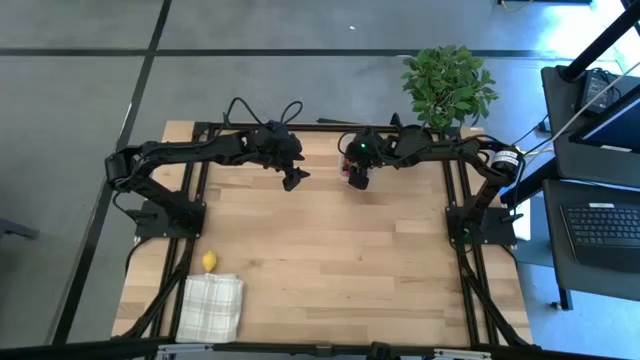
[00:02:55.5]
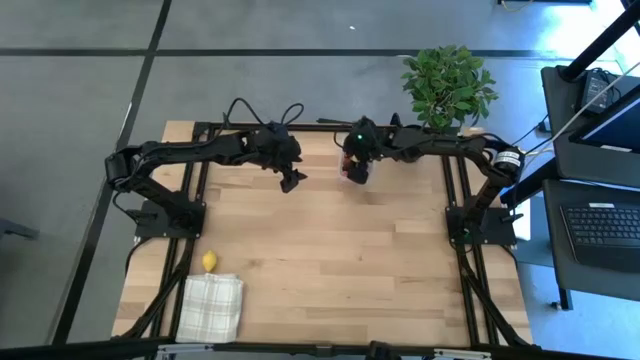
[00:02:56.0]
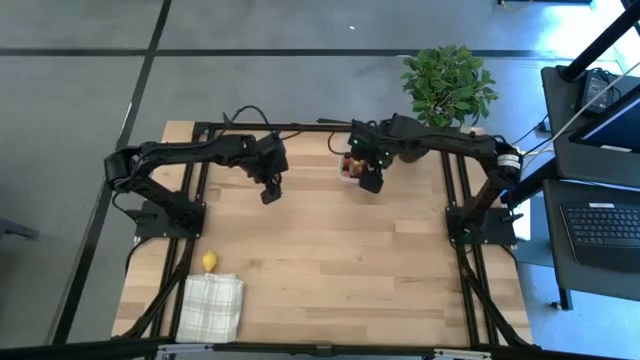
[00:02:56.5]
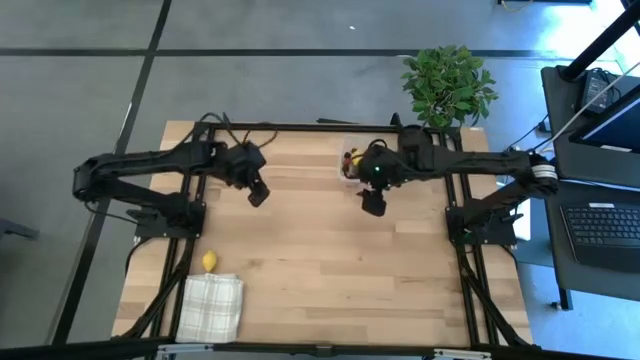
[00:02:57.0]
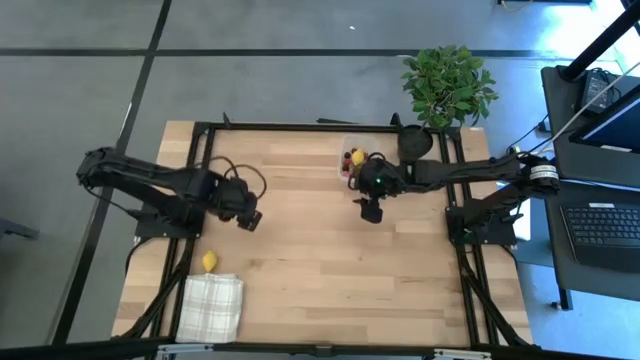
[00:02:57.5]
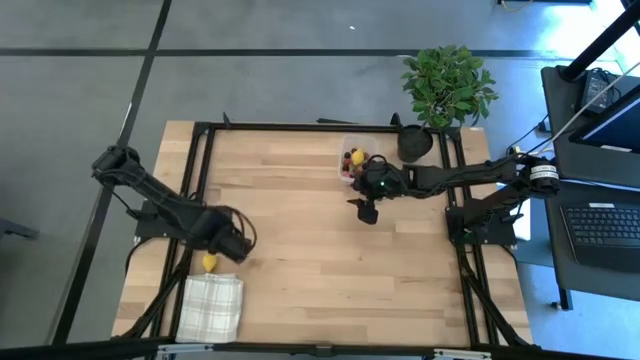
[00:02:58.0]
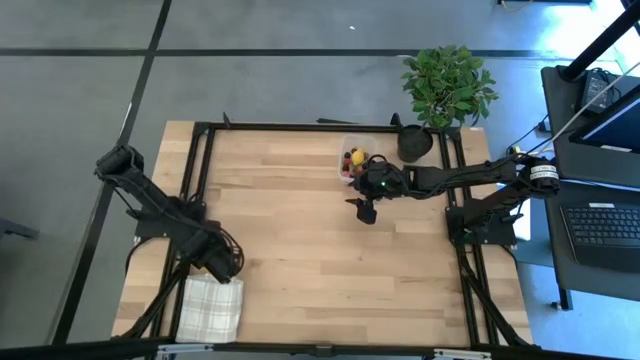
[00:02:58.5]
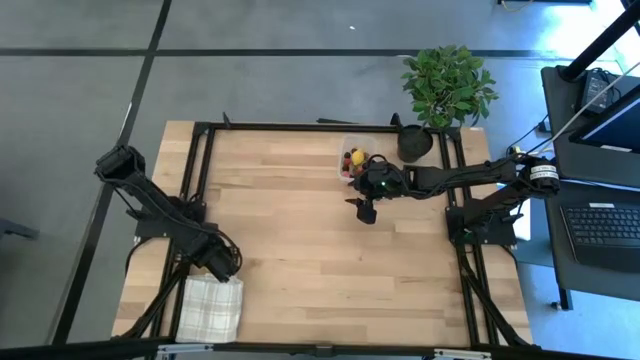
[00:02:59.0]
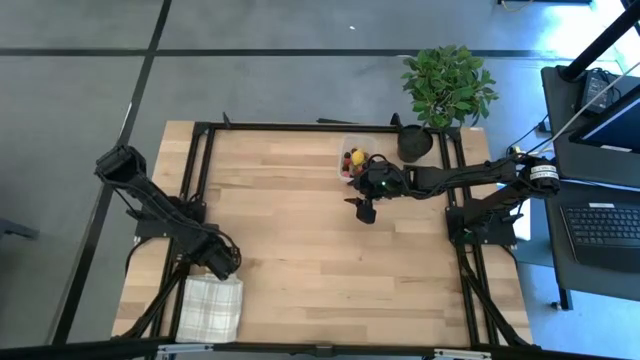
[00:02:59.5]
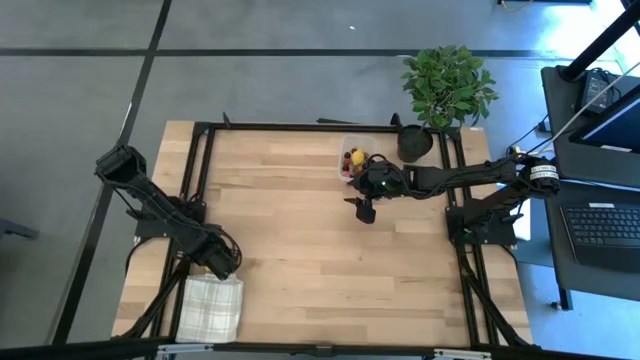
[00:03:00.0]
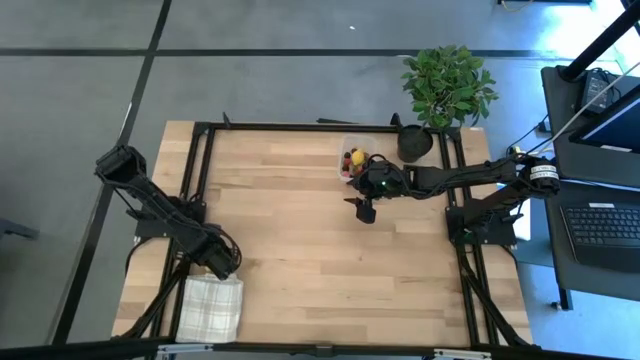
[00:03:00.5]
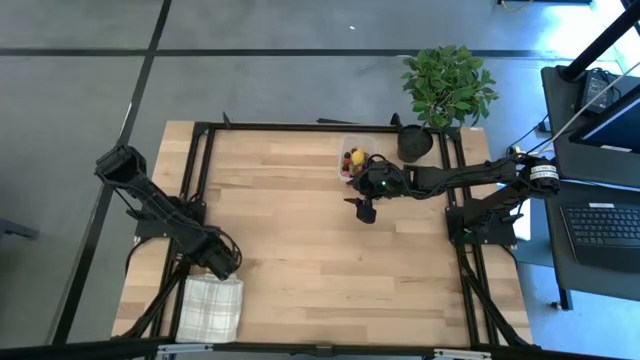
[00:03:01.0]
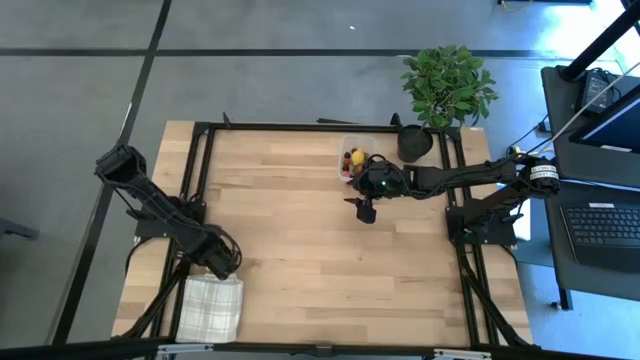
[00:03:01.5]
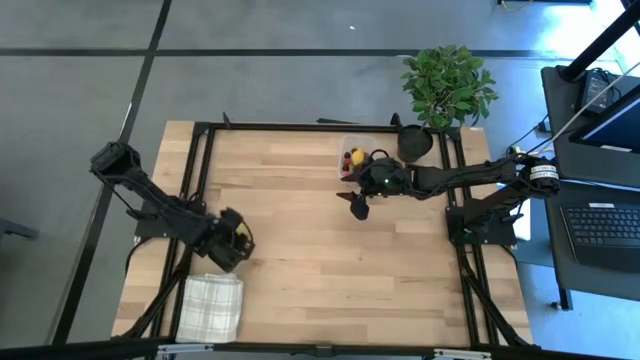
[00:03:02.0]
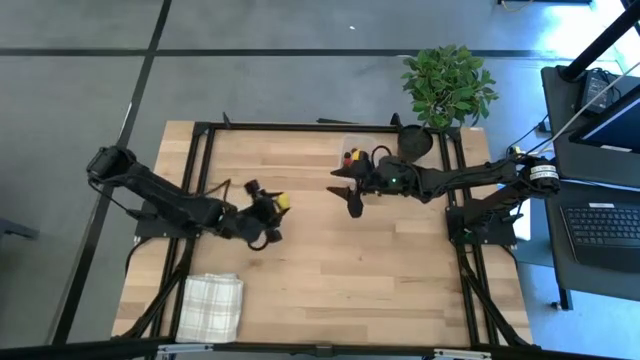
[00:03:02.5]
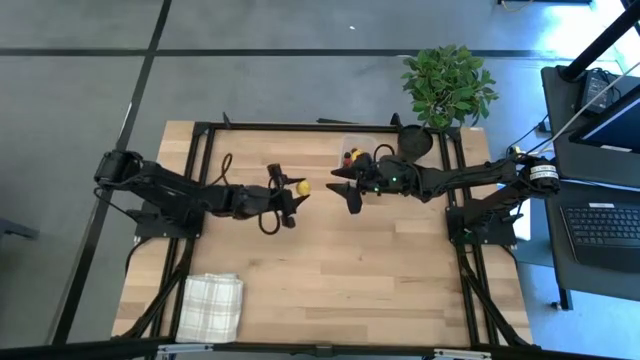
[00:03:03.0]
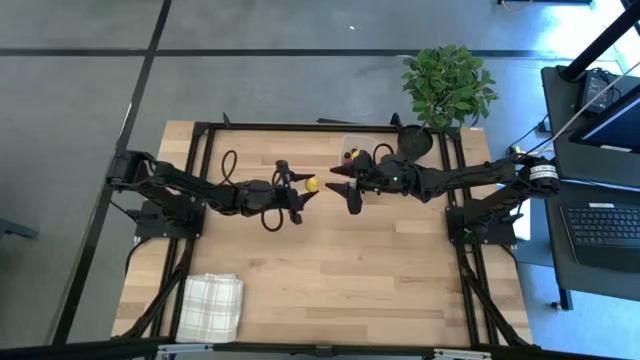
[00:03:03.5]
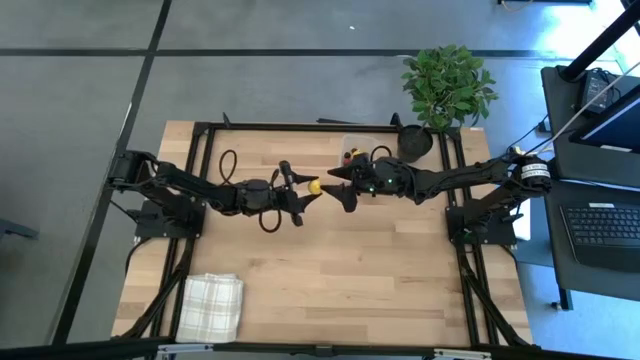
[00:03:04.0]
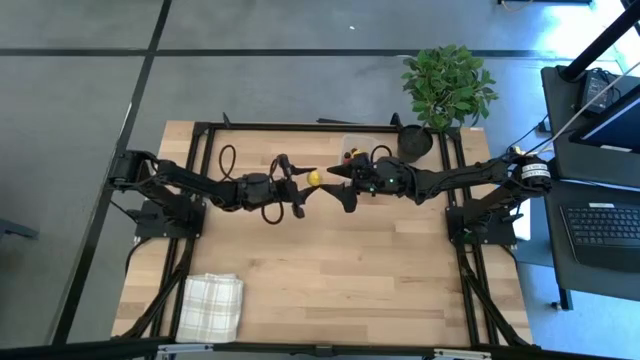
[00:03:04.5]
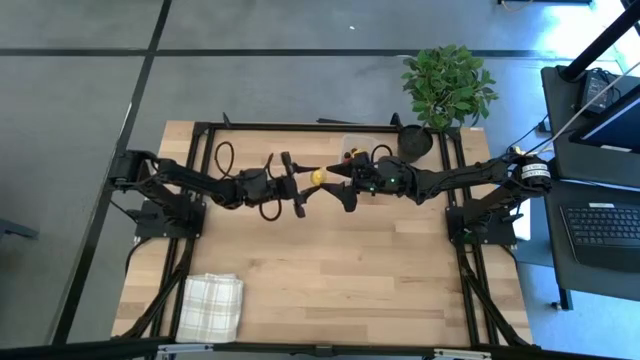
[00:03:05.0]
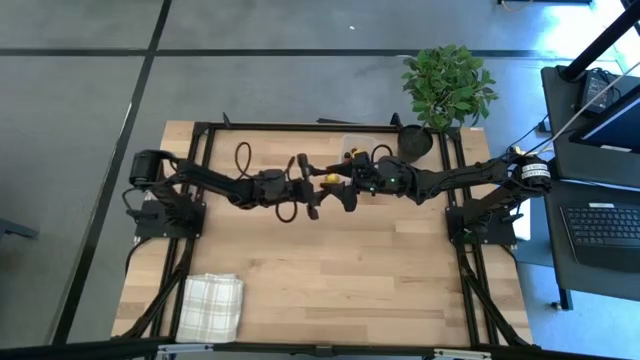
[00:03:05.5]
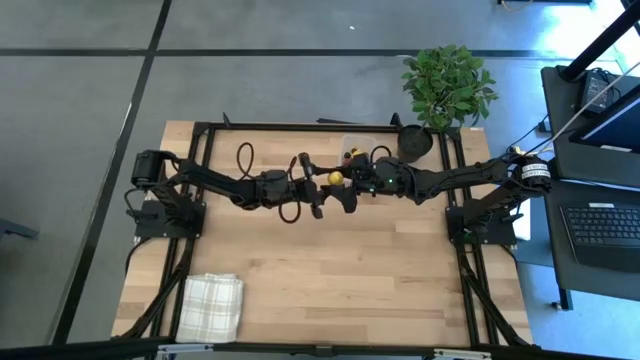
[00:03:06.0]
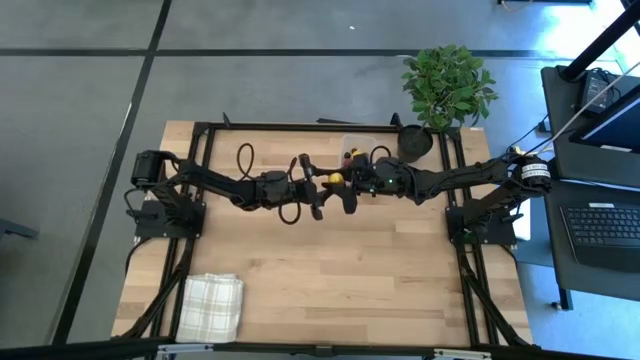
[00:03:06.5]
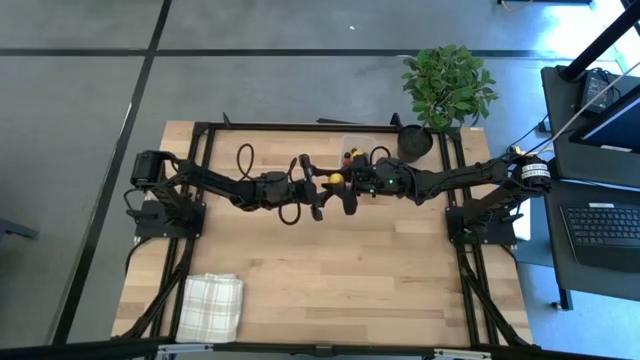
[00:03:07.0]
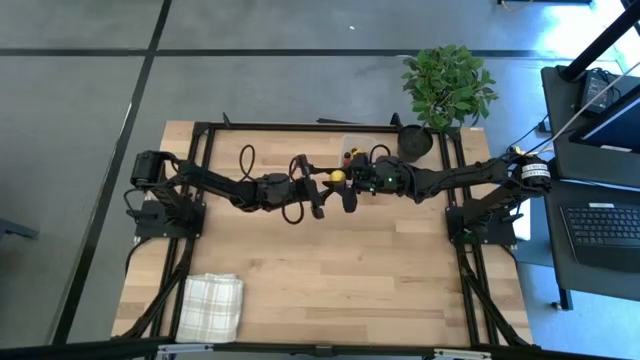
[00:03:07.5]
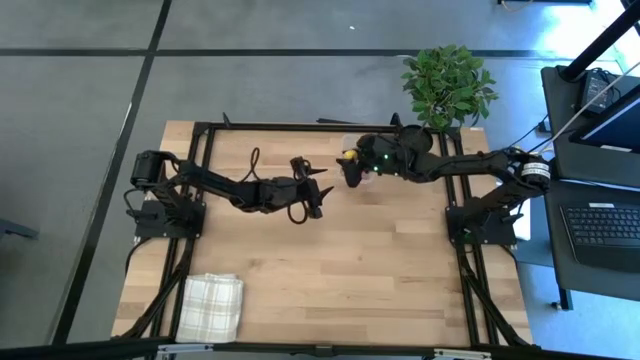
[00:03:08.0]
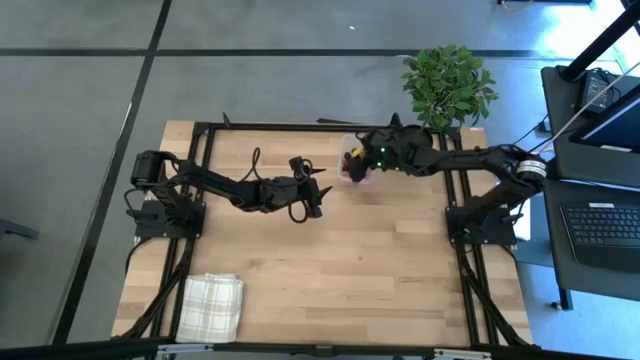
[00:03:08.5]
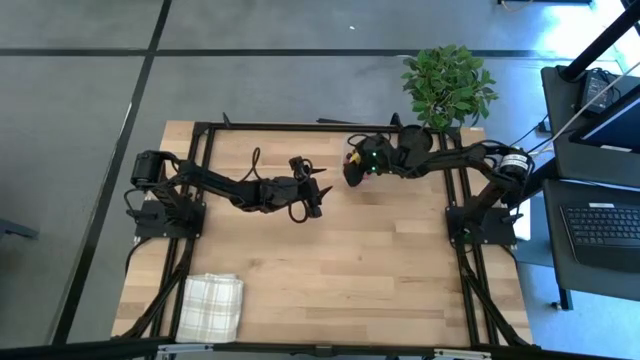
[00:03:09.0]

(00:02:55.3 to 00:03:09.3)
Task: Pick and placing Produce into tupperware
Put the lemon into the transparent bin

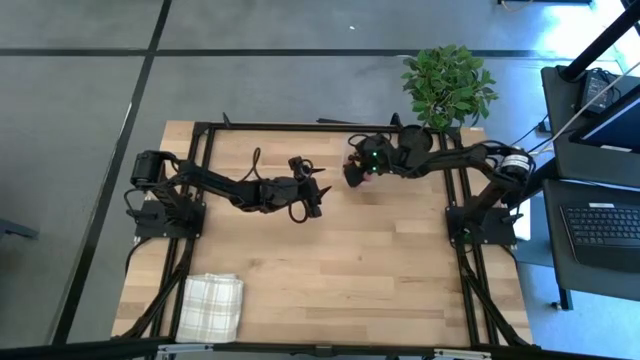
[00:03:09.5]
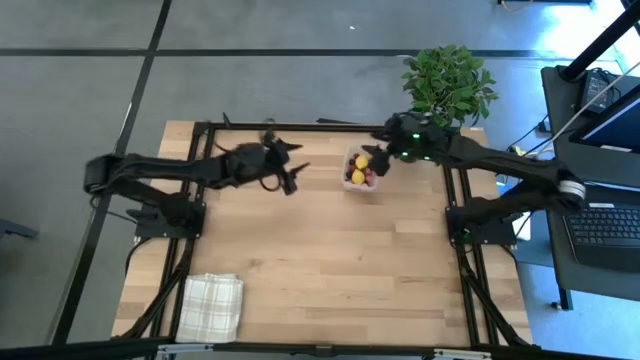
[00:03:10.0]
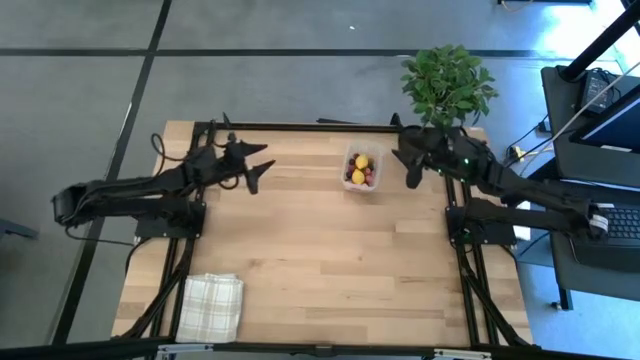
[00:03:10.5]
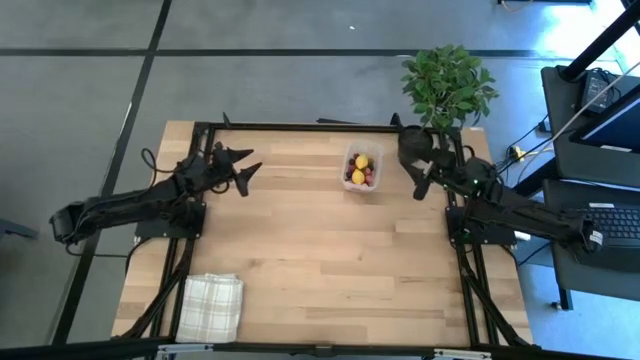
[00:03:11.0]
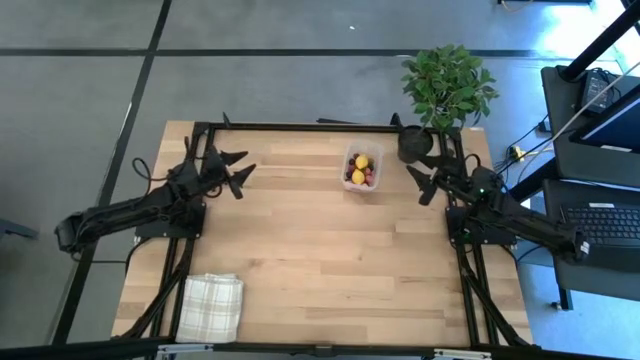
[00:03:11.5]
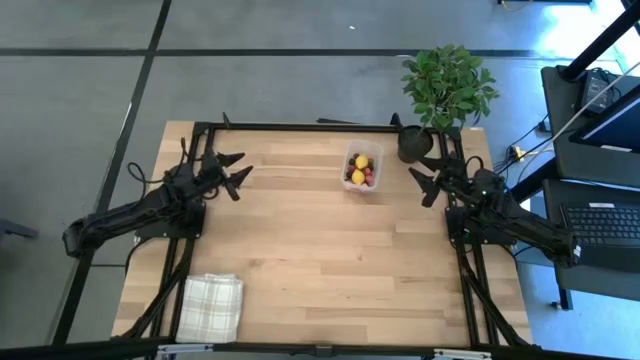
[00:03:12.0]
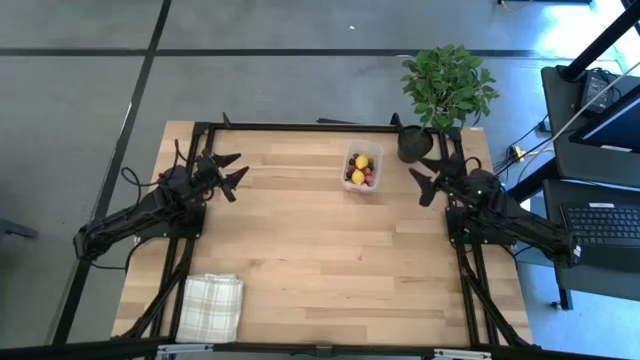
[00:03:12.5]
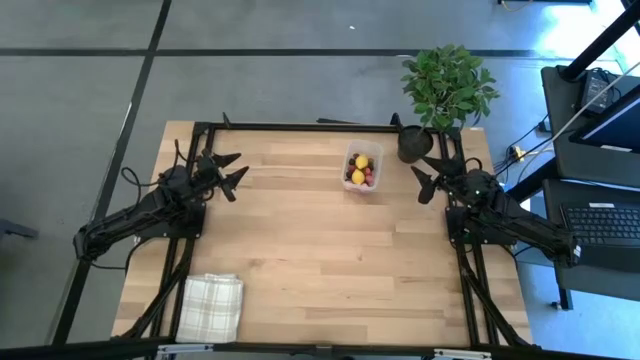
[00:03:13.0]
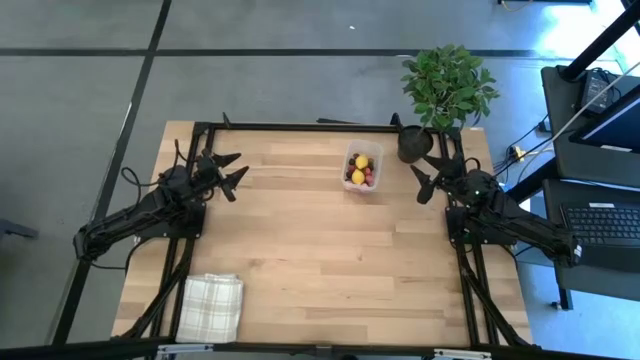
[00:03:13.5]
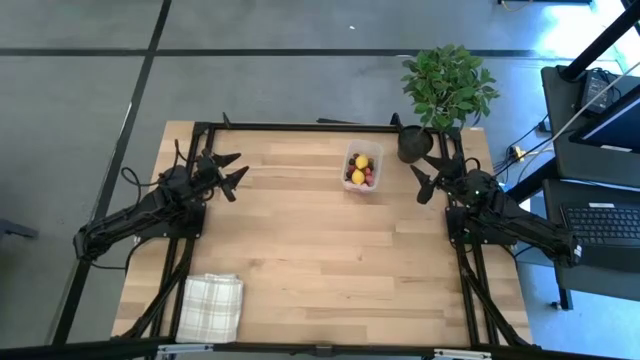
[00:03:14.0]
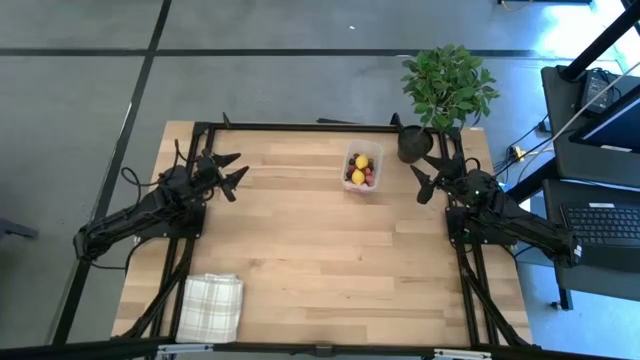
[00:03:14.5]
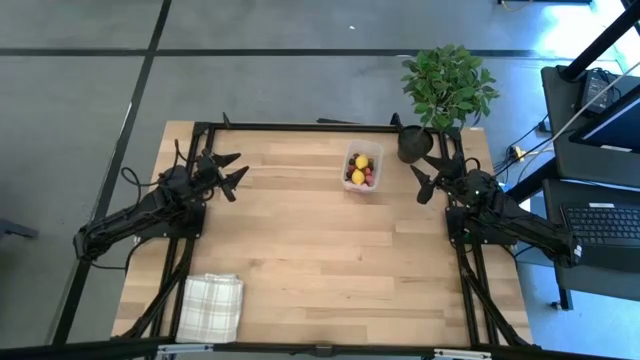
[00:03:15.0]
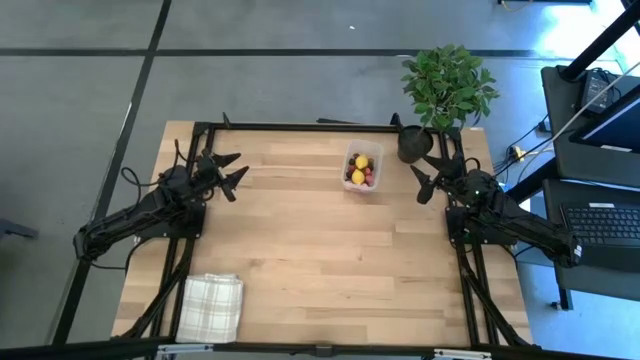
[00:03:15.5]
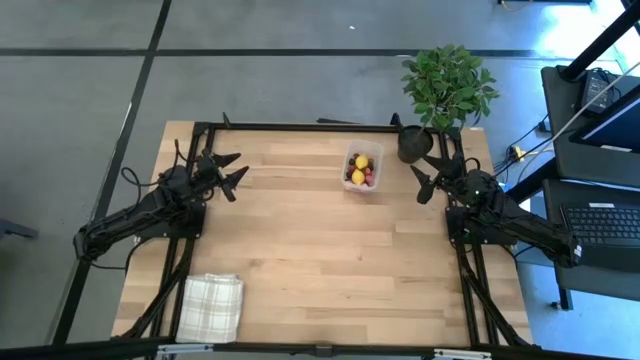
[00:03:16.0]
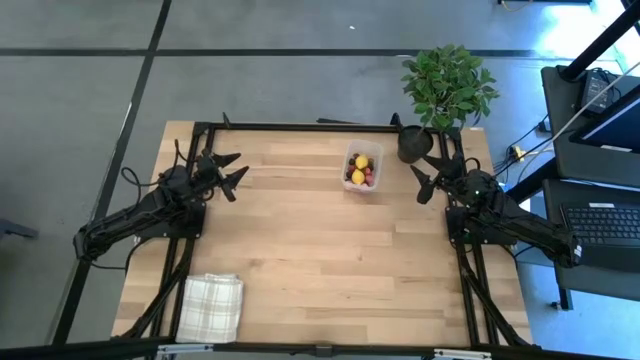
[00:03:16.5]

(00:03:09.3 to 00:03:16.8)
Return to Home Position
